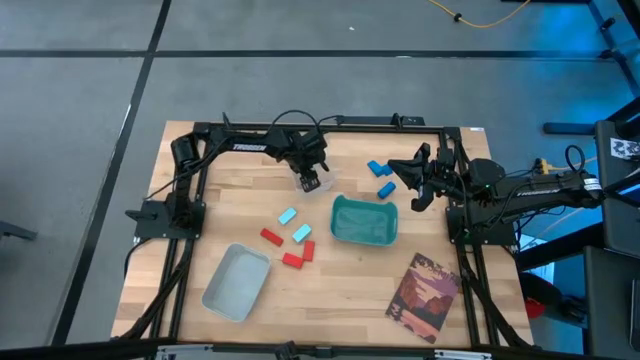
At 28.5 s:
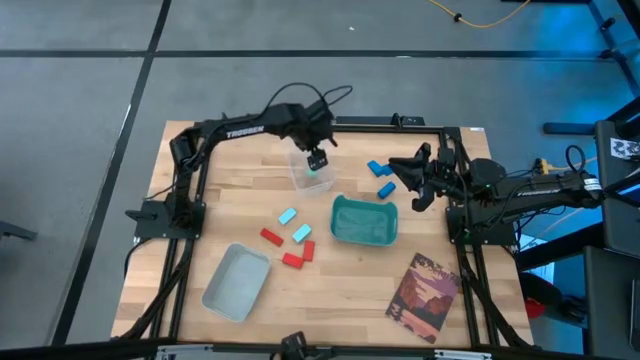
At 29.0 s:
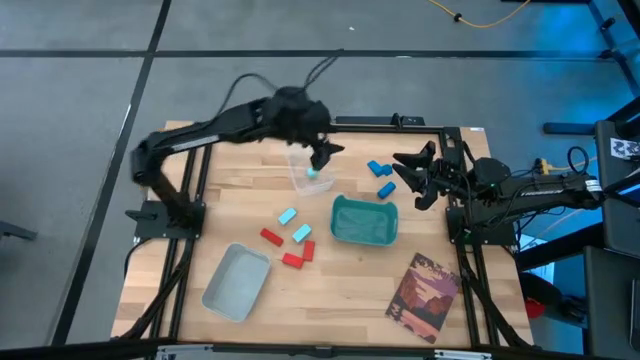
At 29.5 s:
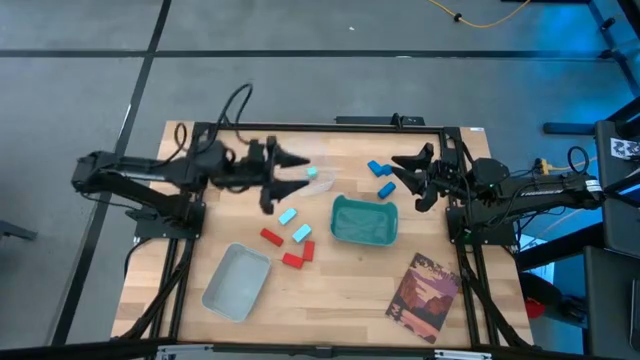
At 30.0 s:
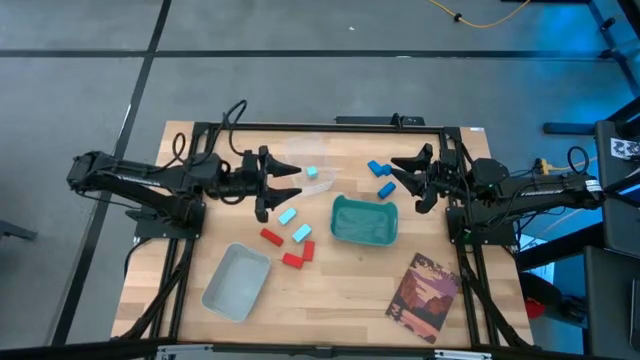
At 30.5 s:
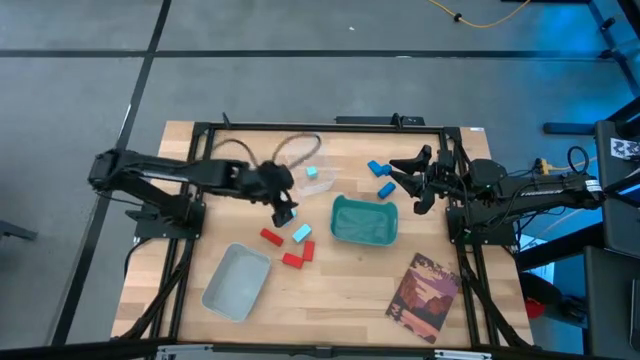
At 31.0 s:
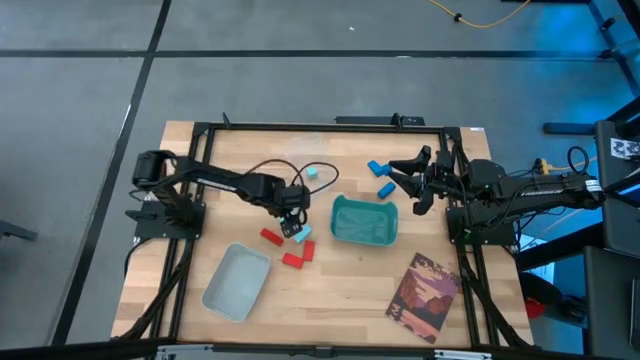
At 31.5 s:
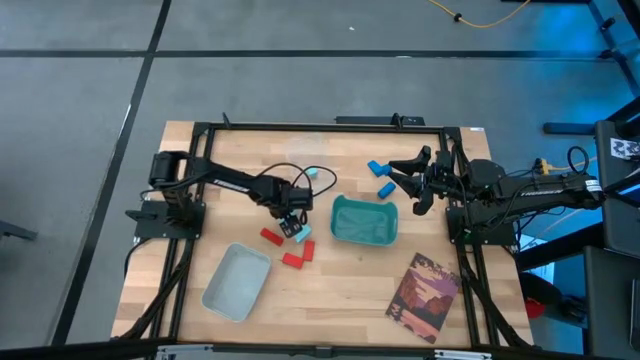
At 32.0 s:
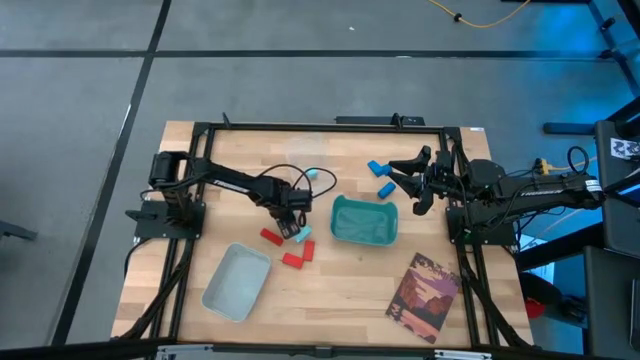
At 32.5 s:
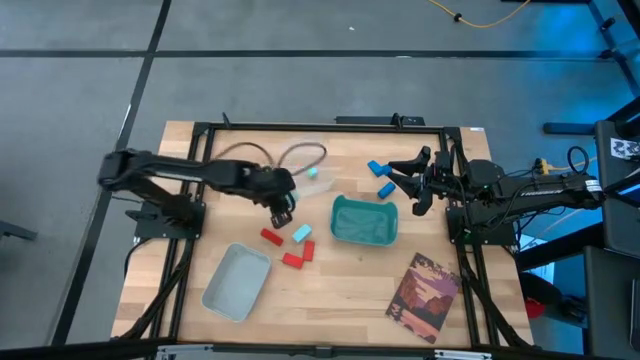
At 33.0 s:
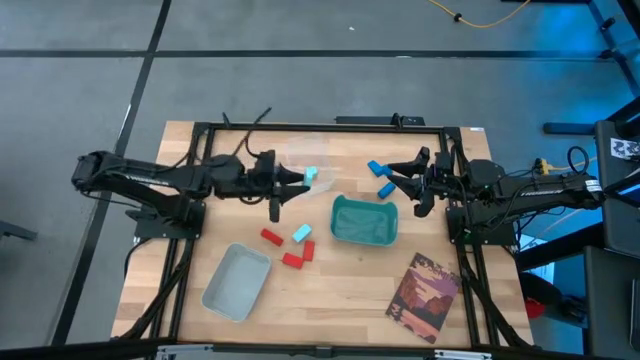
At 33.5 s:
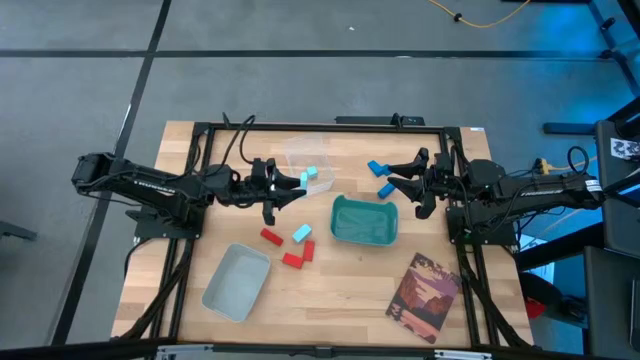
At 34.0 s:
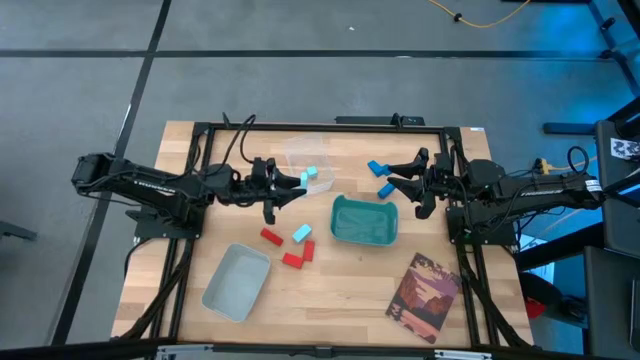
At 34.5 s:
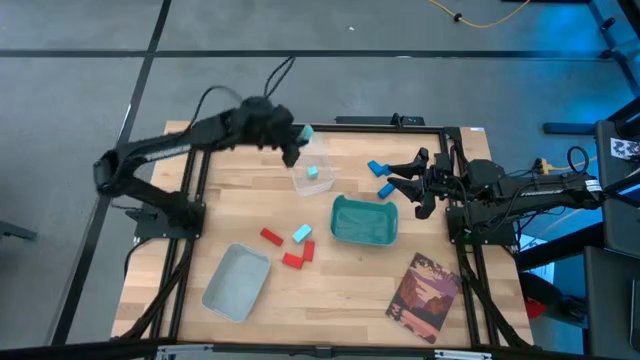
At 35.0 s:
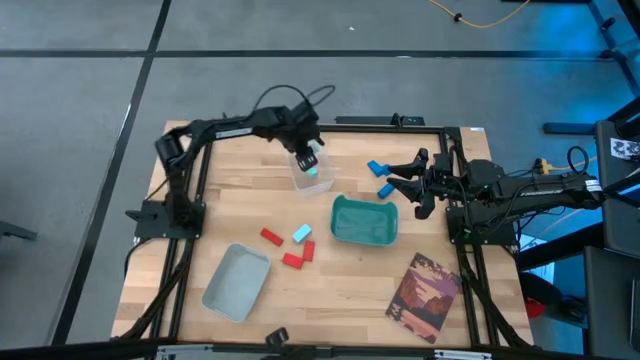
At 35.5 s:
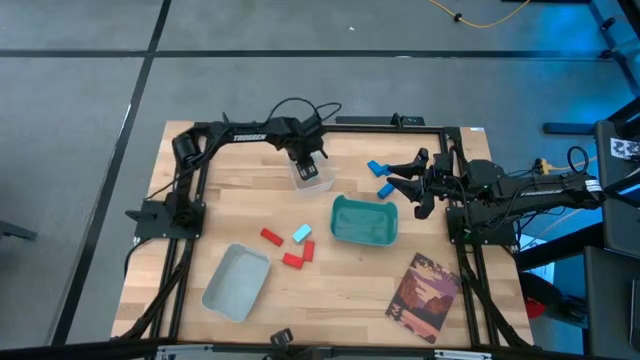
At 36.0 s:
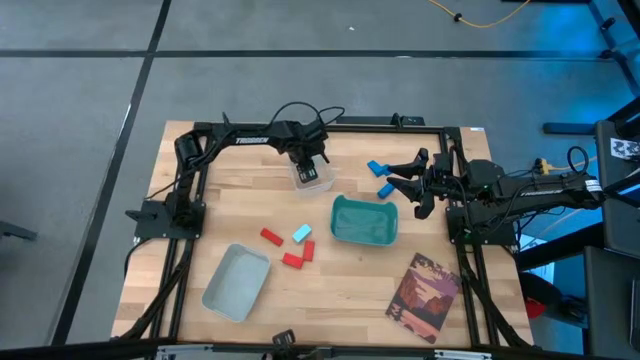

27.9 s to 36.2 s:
Task: Sort & place blocks by color
Put the light blue block into the transparent bin

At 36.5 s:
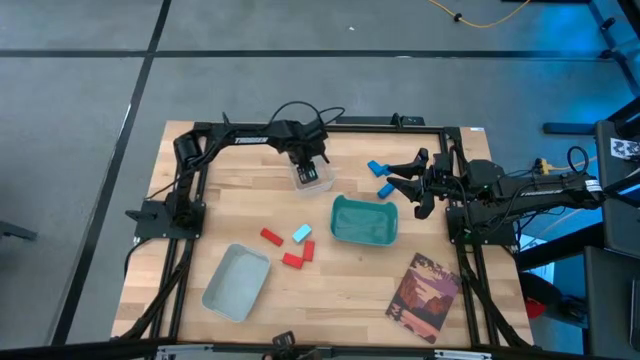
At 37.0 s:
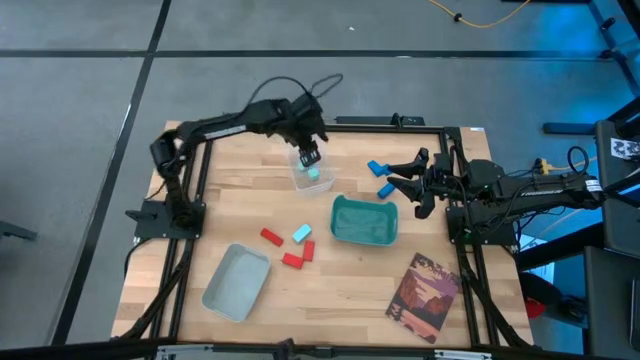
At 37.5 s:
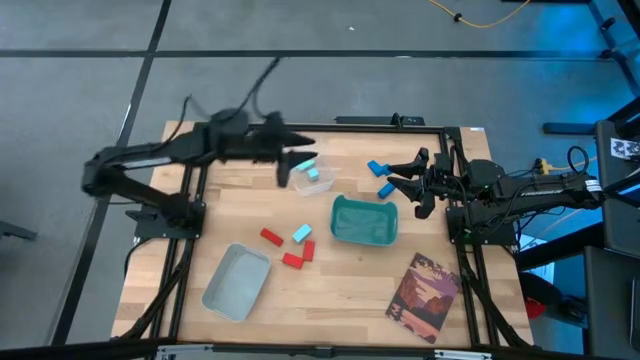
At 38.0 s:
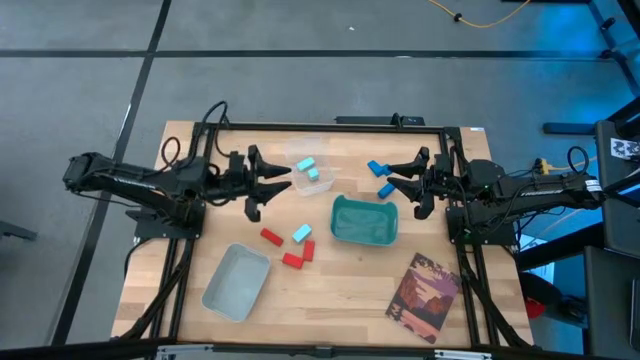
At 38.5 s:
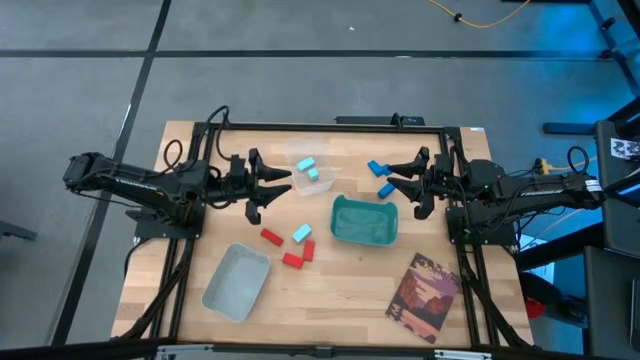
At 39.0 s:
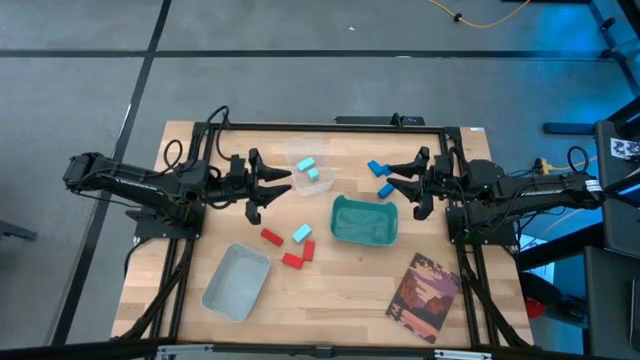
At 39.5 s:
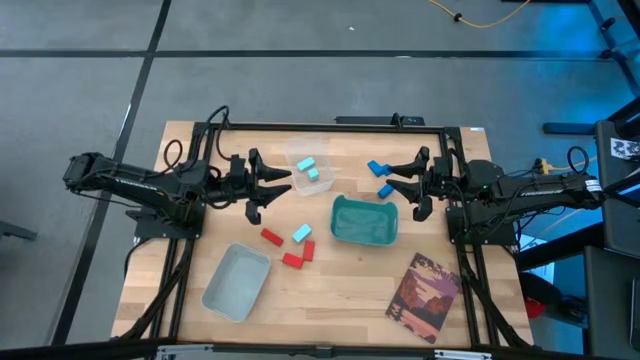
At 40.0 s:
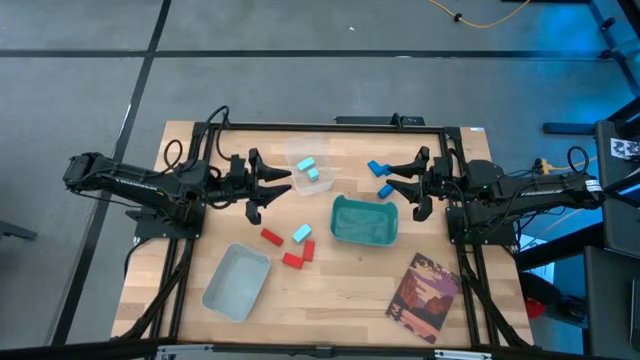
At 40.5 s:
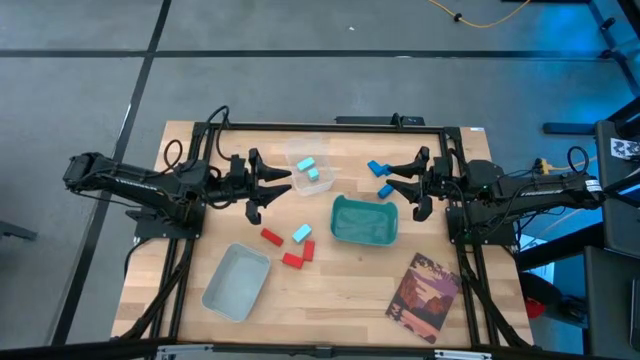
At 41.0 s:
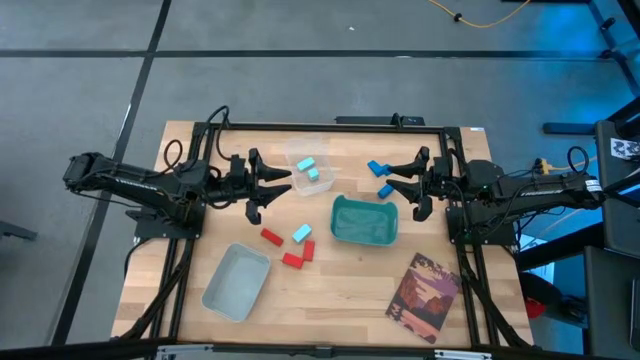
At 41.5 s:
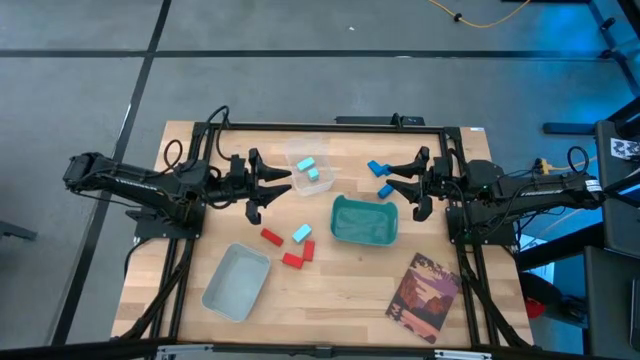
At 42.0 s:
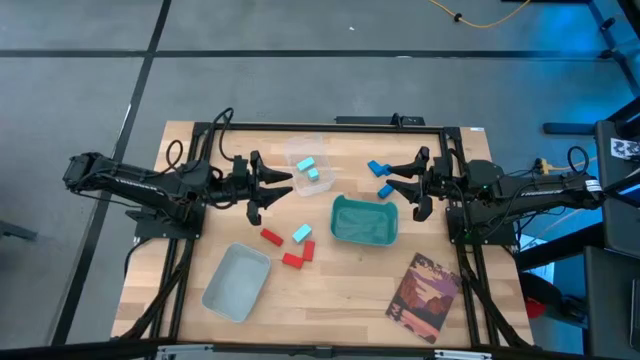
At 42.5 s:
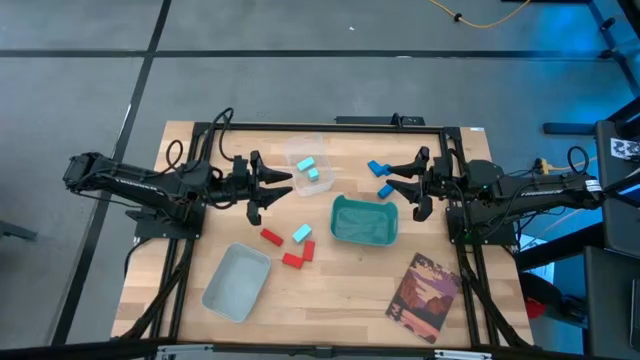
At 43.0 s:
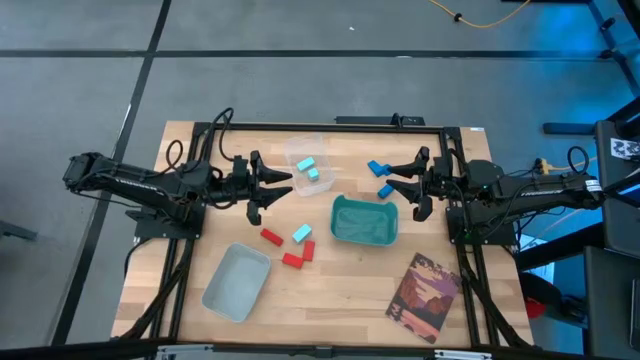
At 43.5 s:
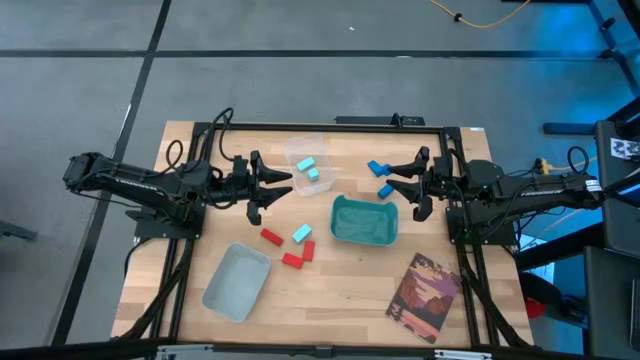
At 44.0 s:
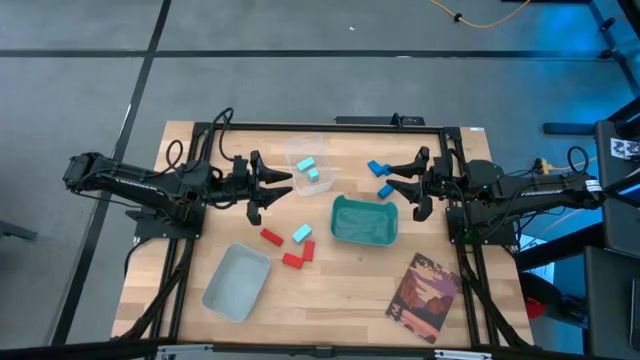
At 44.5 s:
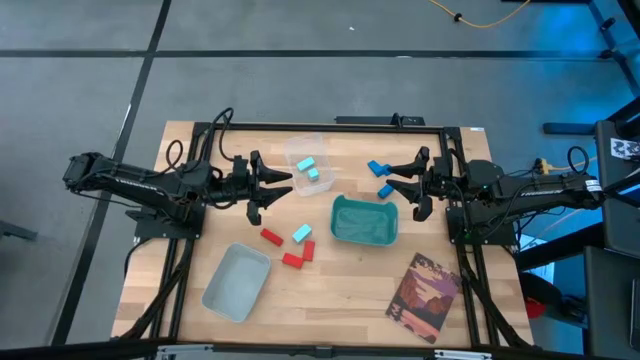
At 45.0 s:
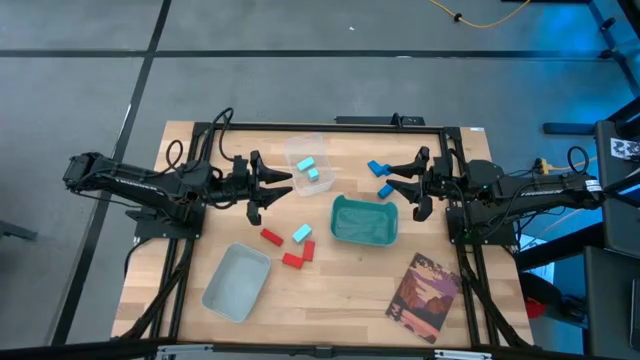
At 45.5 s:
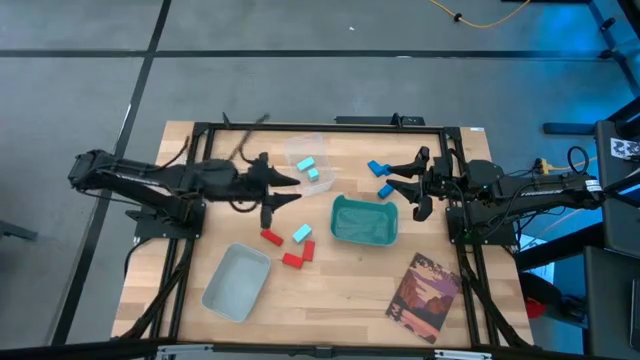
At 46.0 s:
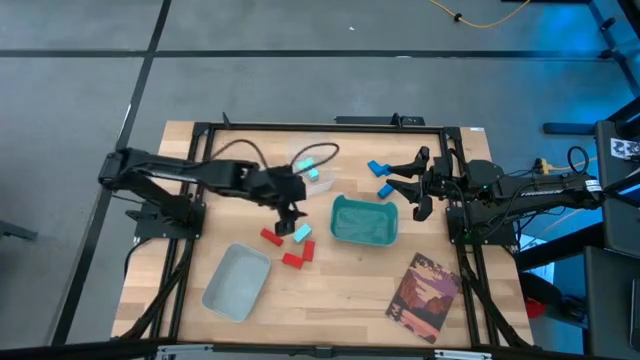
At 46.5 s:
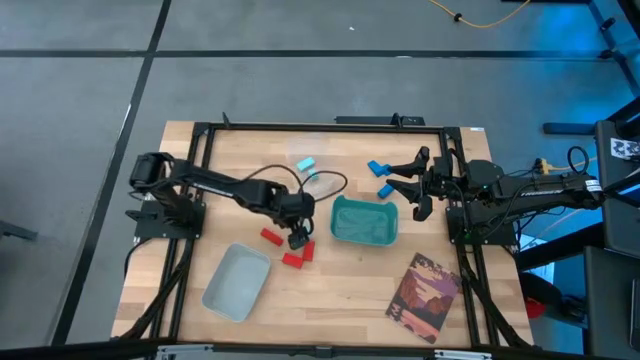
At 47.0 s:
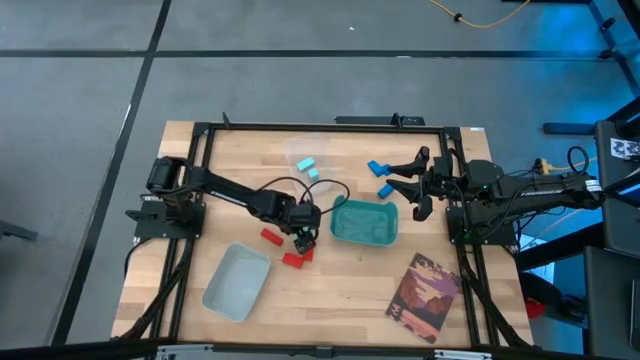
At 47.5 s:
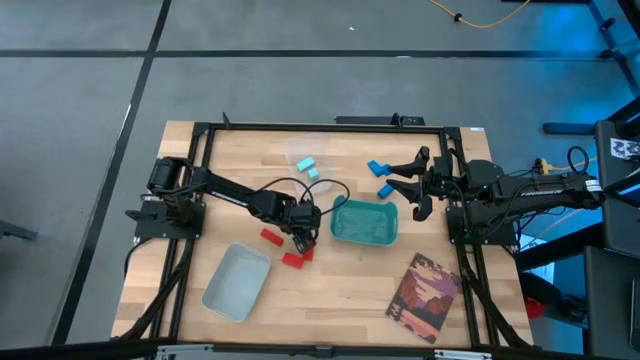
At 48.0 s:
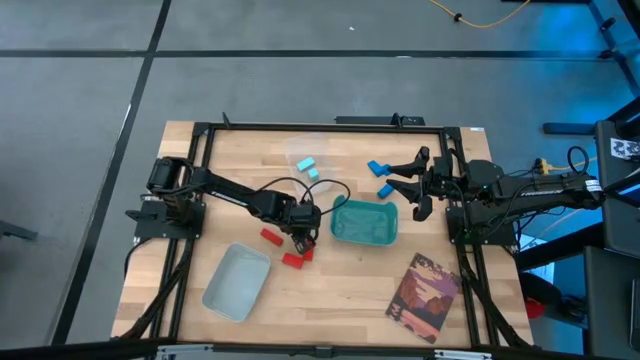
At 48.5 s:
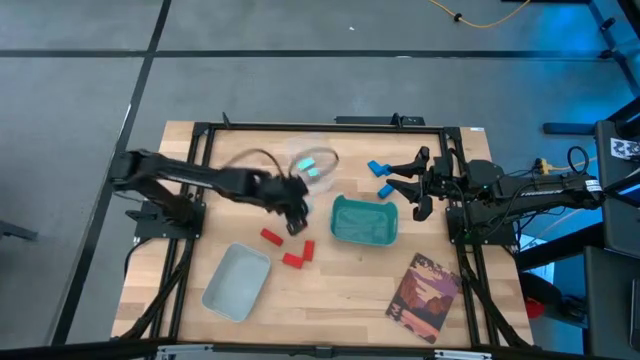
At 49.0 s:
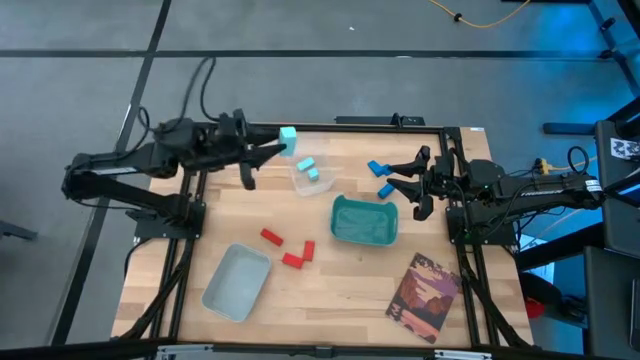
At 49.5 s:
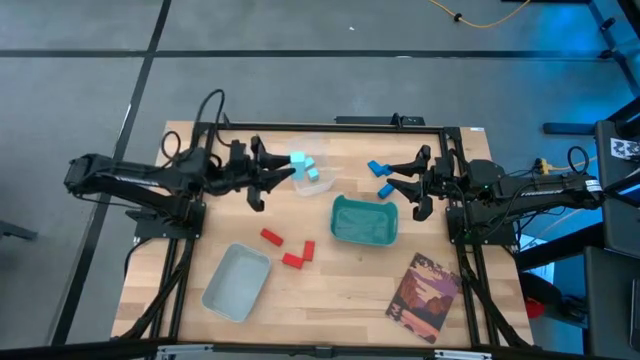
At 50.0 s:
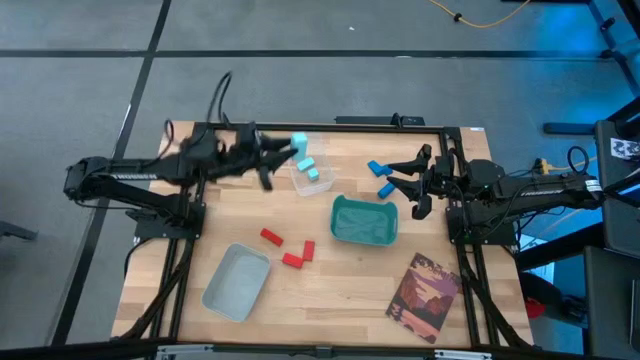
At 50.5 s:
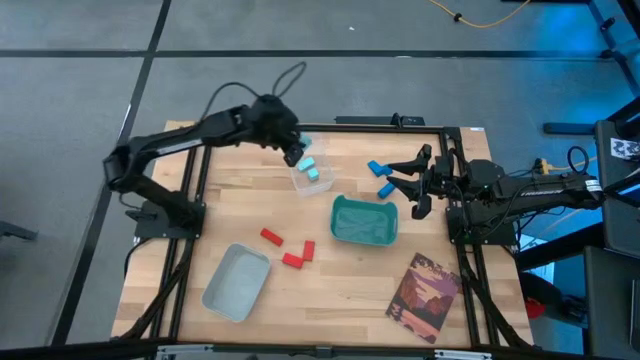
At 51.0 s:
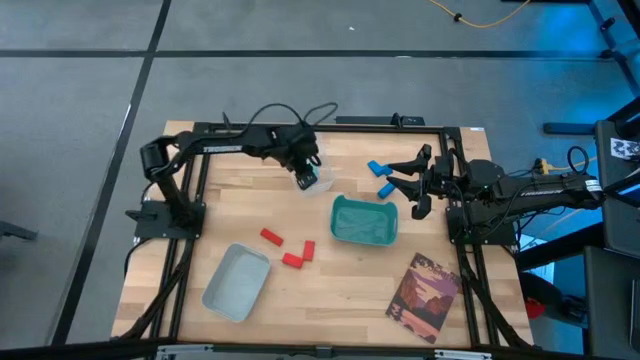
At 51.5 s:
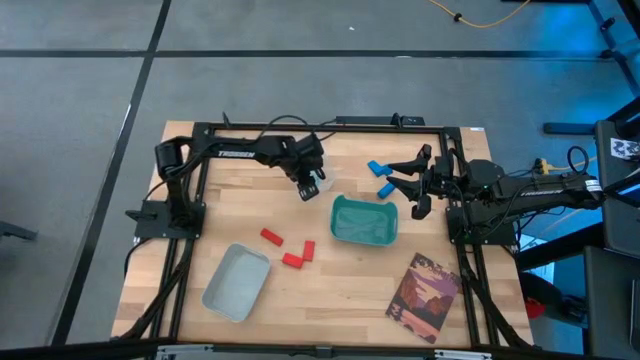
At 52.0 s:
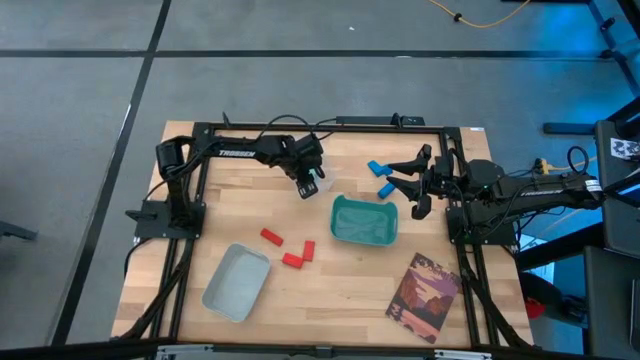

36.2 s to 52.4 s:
Put the light blue block into the transparent bin
